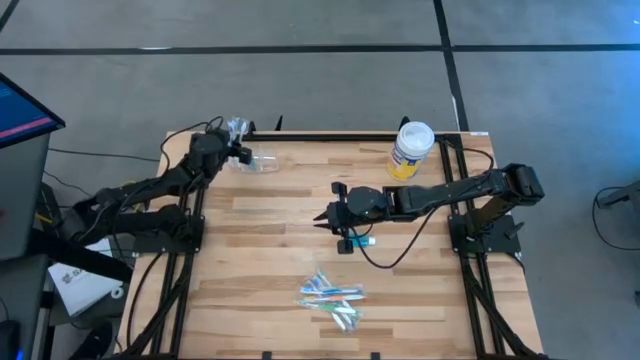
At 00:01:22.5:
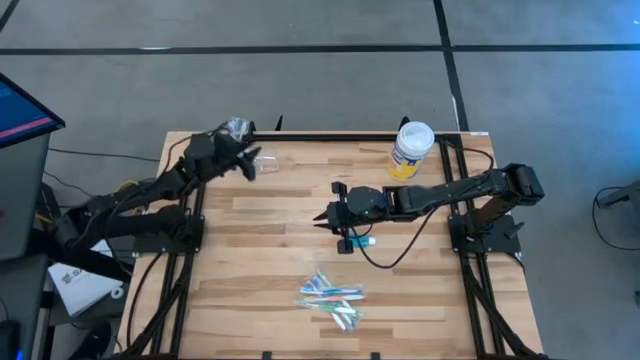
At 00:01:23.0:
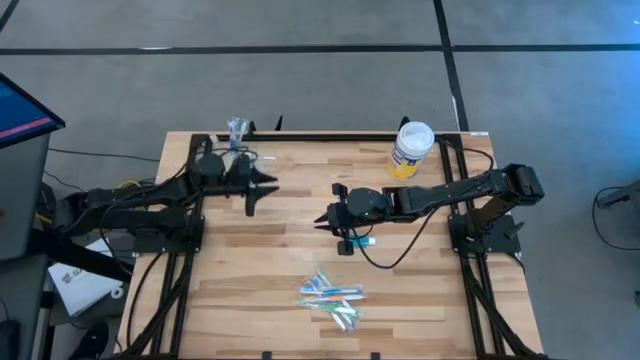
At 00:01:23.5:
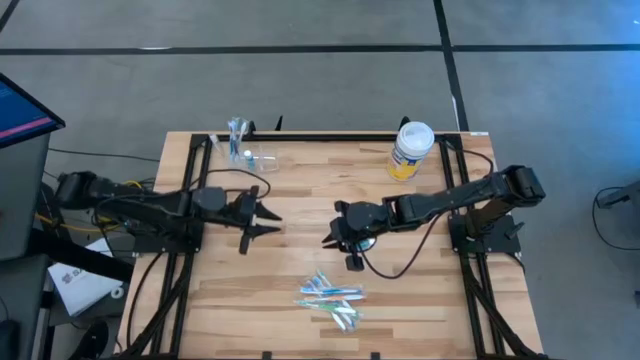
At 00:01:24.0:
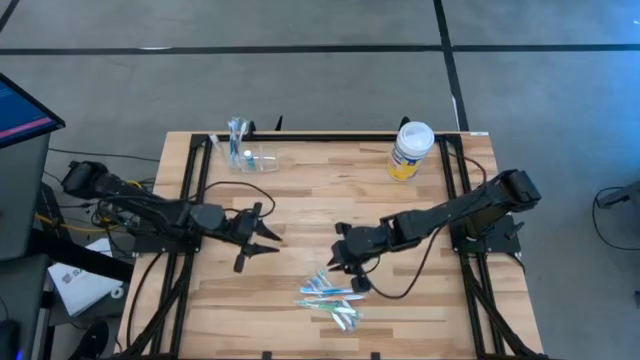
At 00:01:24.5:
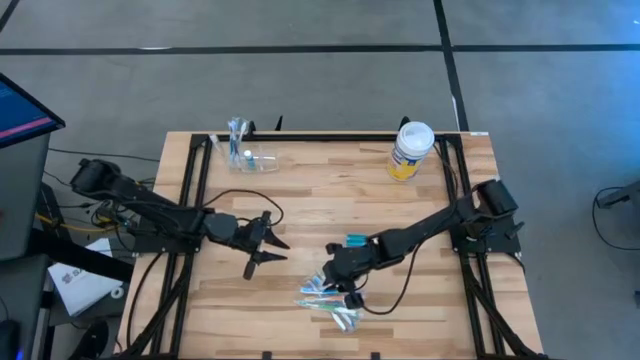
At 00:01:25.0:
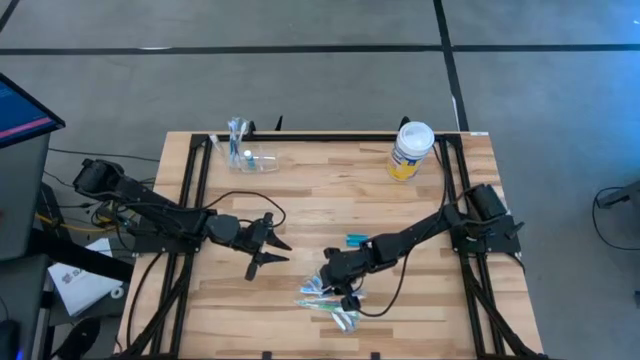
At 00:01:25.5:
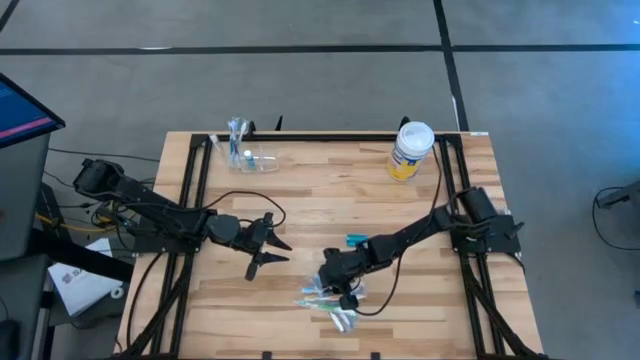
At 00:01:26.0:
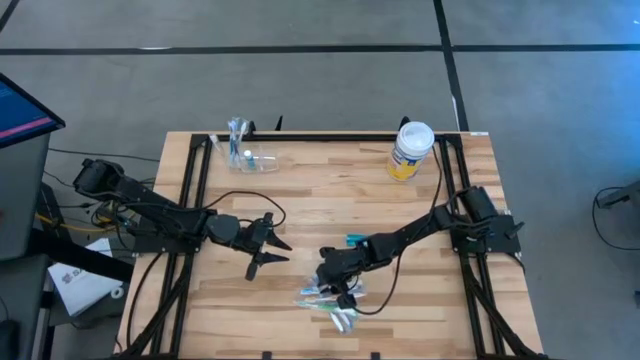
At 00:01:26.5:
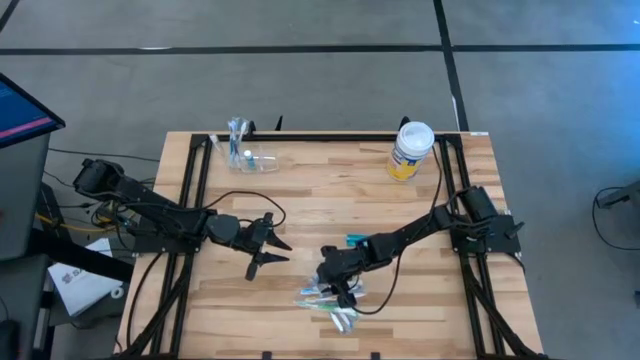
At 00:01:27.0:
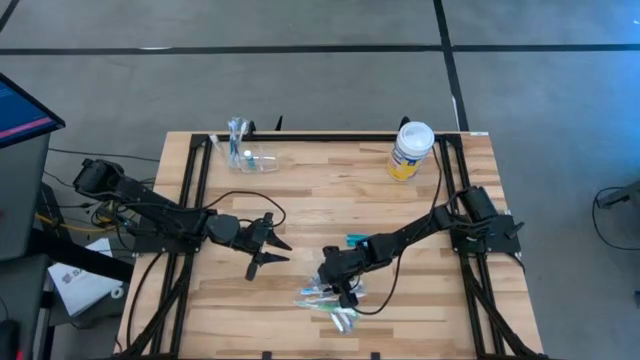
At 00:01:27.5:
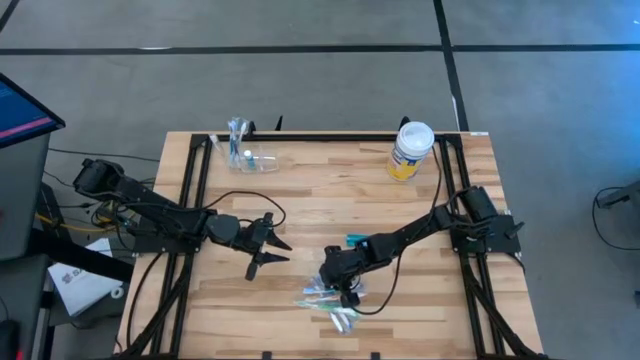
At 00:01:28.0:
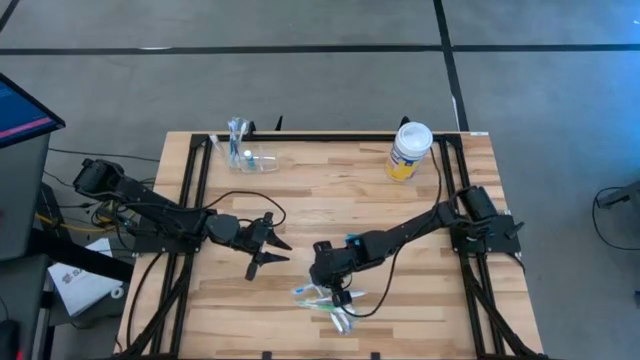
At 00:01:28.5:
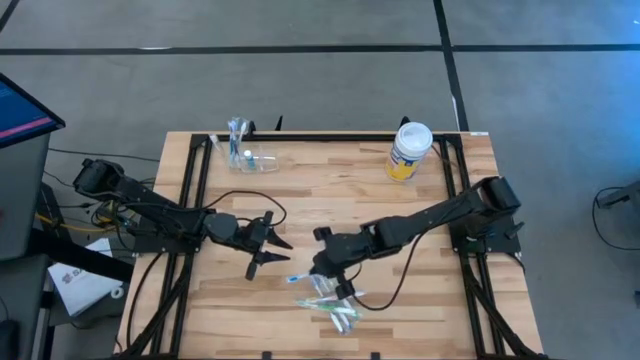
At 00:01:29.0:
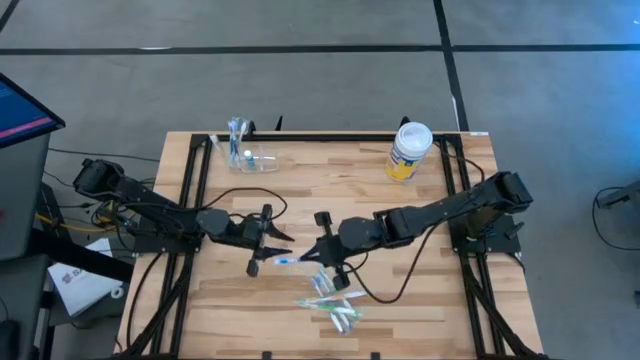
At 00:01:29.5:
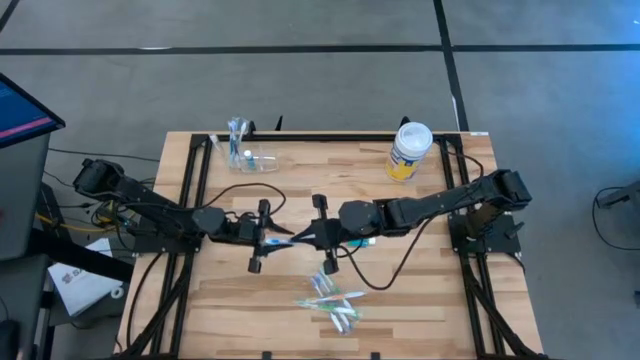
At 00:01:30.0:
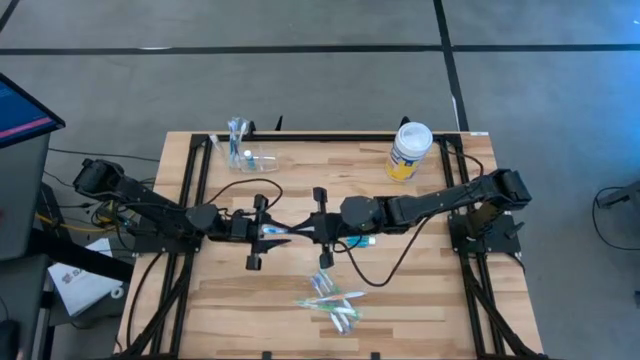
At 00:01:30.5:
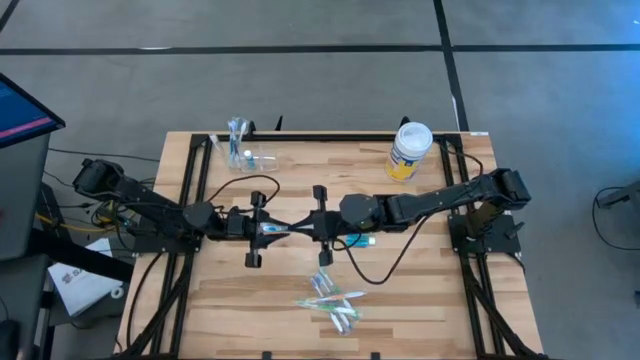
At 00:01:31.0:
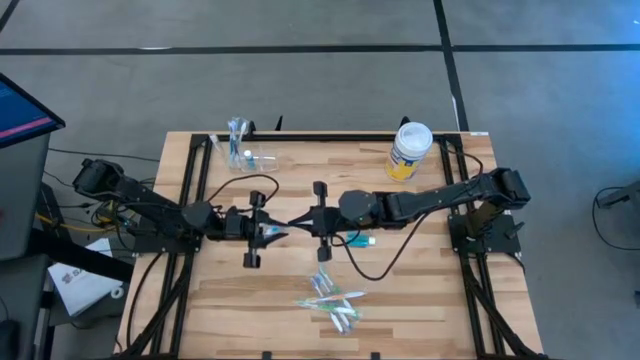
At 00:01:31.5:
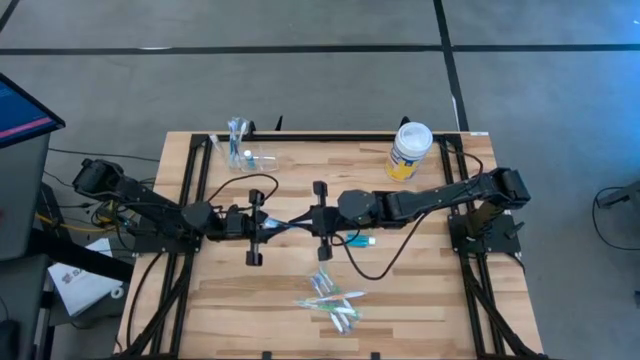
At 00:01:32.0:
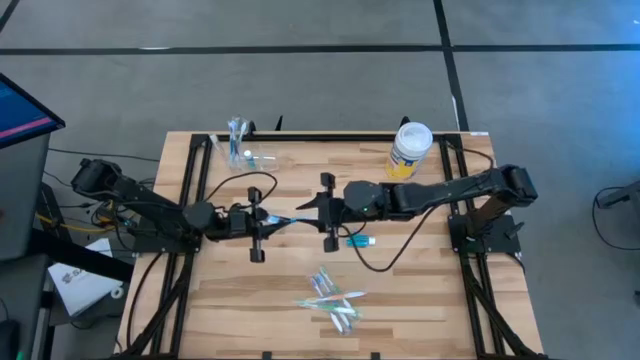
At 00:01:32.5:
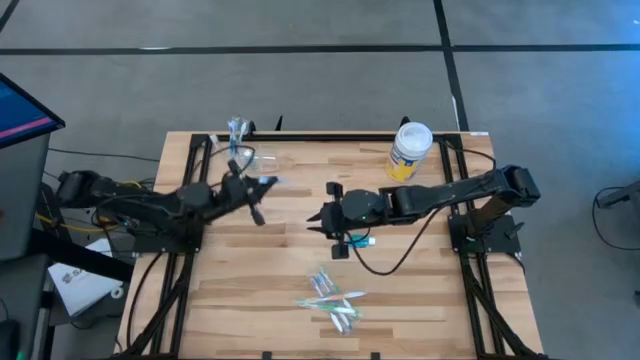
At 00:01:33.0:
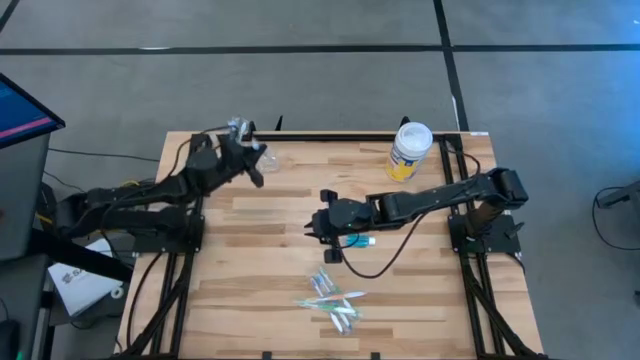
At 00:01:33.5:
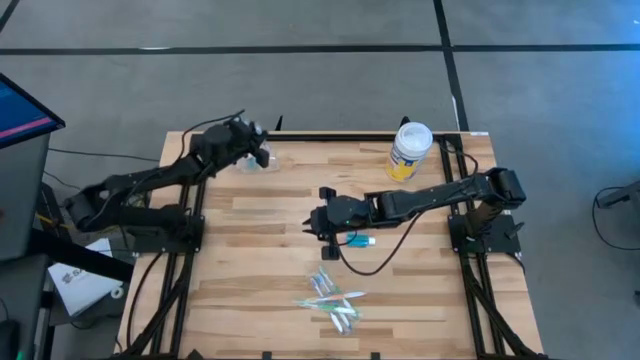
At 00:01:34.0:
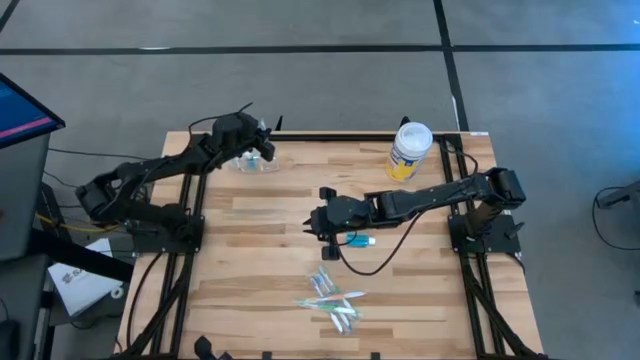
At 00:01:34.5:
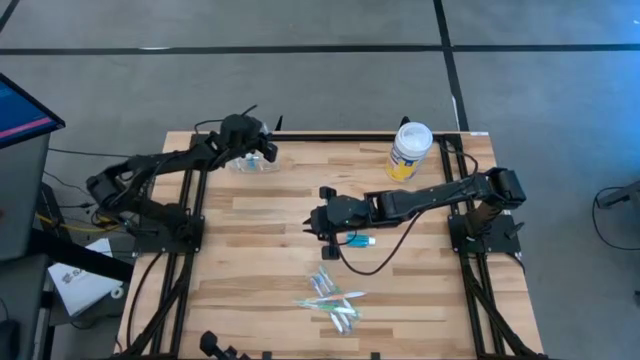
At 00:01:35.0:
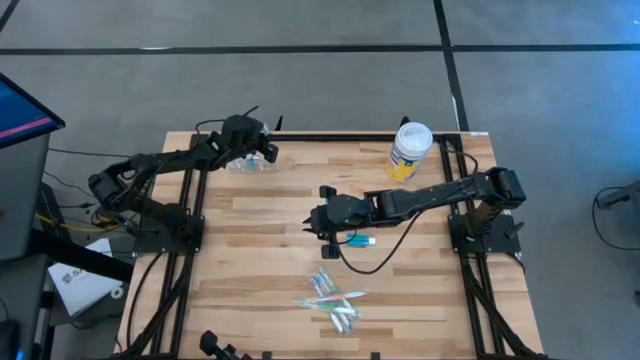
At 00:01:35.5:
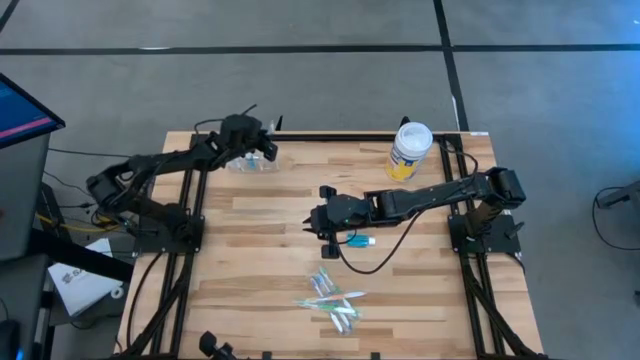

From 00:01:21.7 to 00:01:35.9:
Task: Pick & Place toothbrushing station
Put the blue toothbrush into the transparent organizer

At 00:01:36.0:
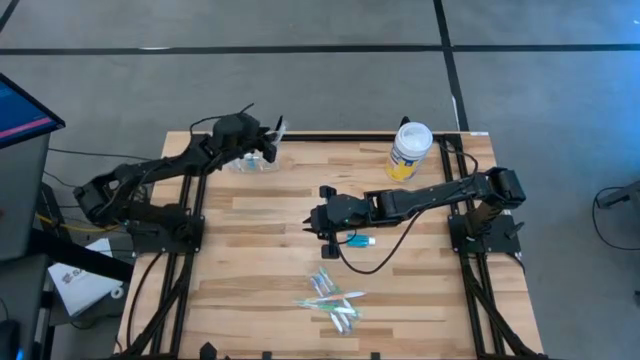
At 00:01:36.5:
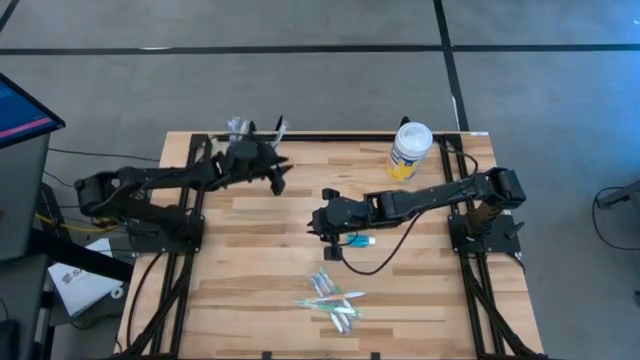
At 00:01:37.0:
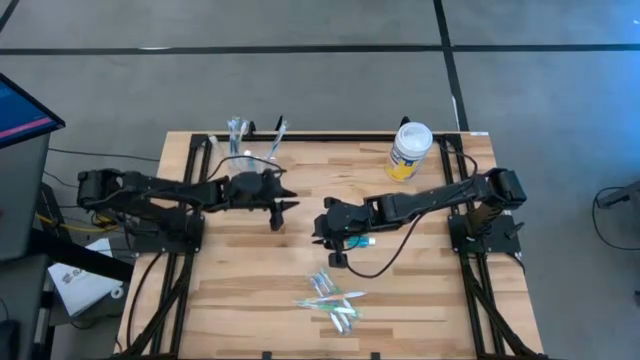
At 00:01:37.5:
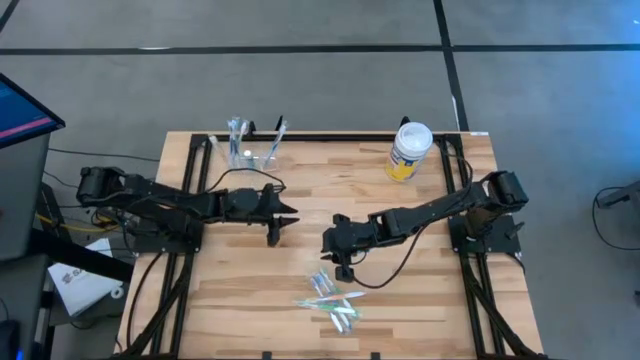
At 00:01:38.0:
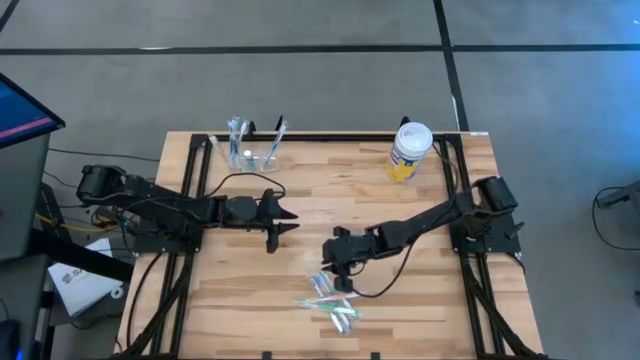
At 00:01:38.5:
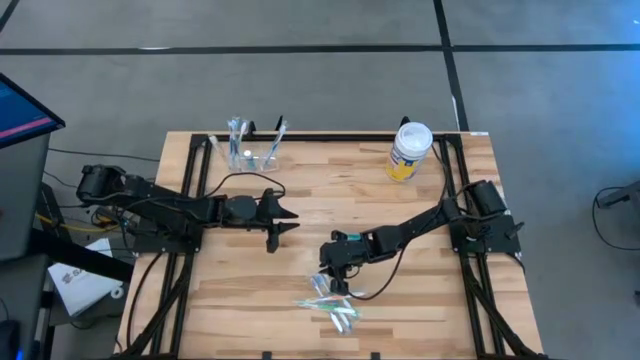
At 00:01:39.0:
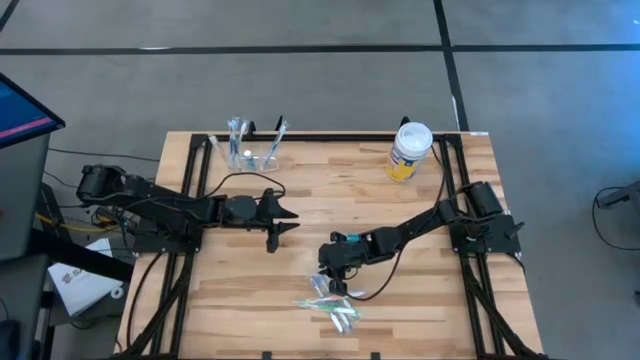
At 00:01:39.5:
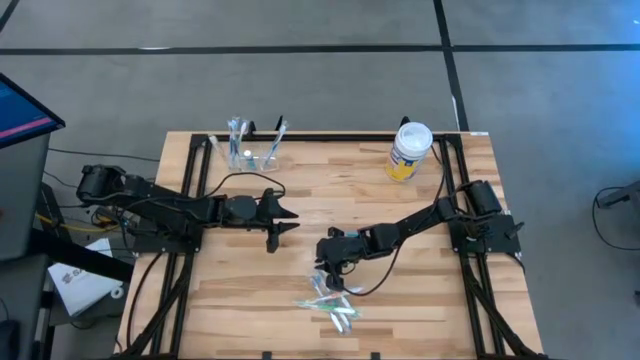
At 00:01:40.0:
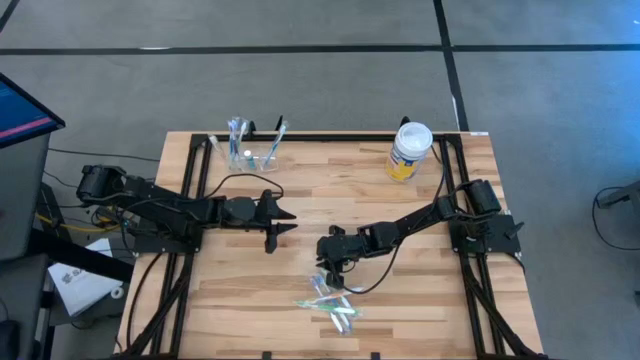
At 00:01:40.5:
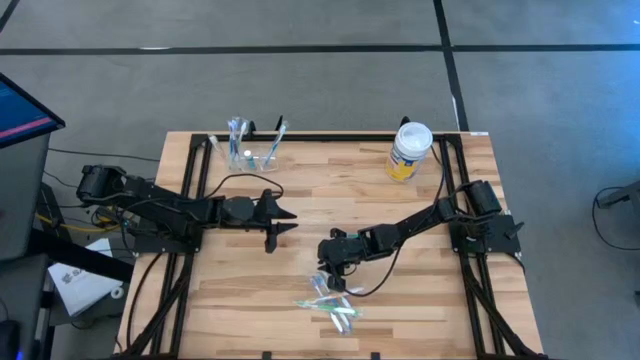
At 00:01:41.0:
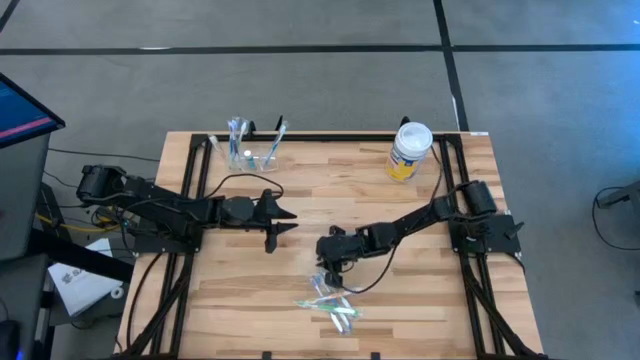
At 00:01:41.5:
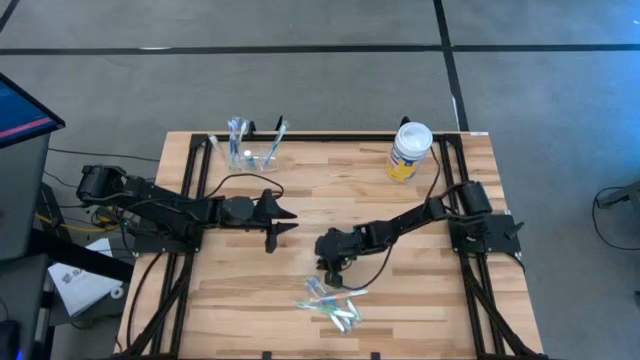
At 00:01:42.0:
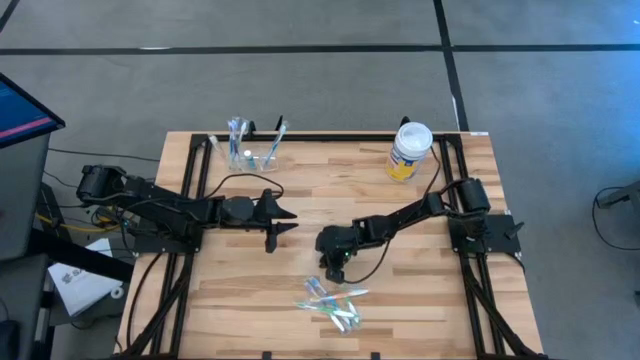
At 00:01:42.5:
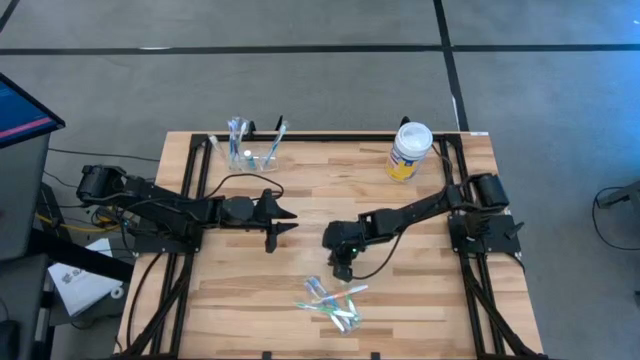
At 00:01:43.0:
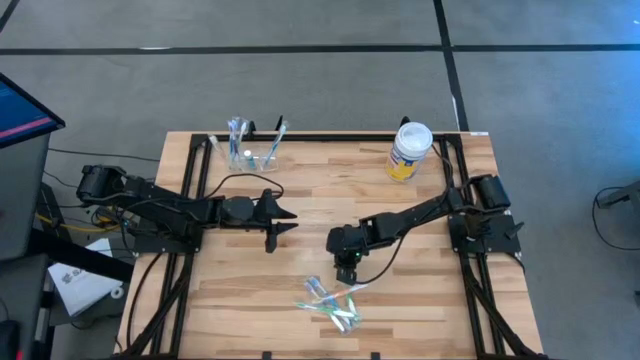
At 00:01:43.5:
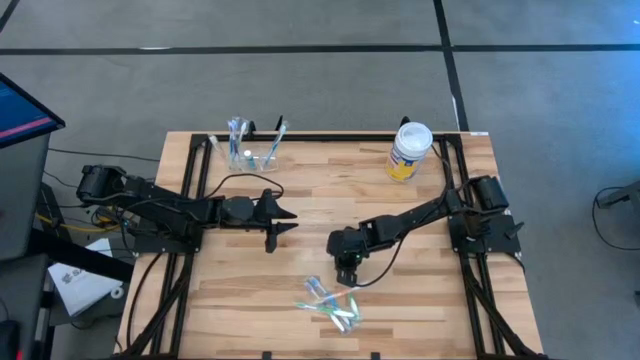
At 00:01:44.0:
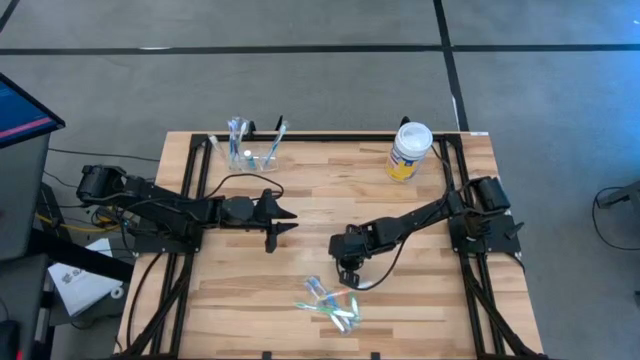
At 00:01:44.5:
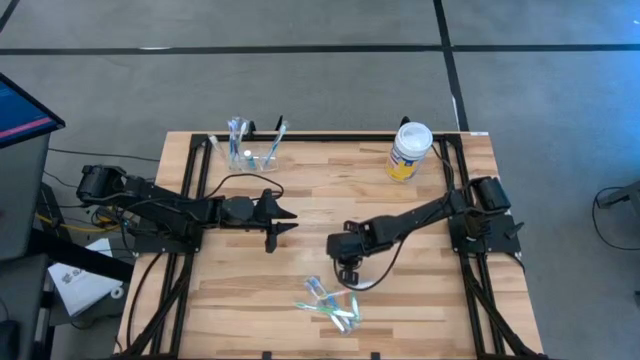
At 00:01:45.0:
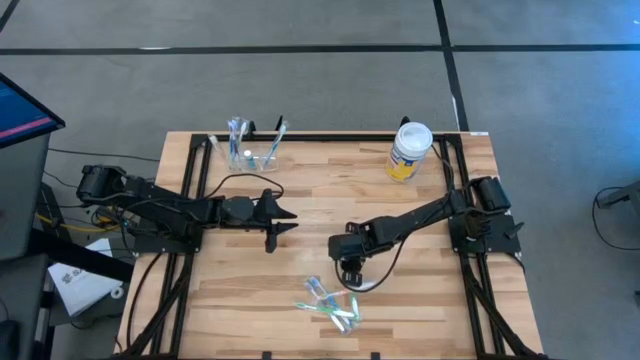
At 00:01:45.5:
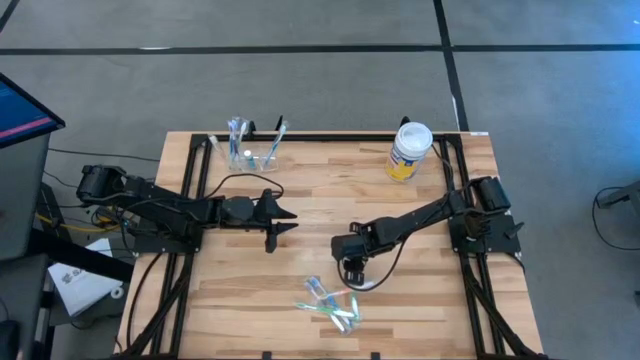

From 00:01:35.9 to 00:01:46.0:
Put the green toothbrush into the transparent organizer
